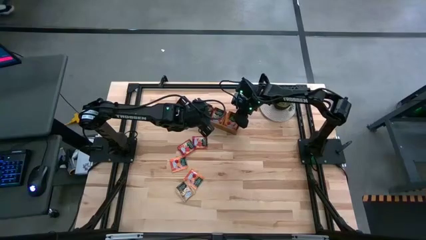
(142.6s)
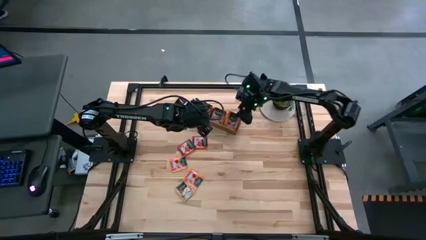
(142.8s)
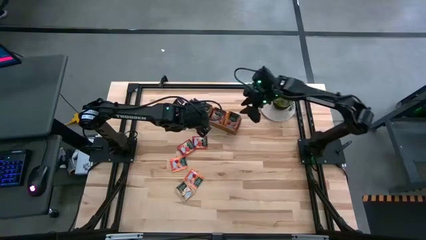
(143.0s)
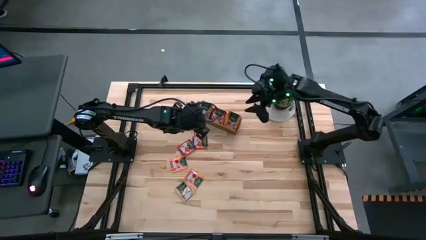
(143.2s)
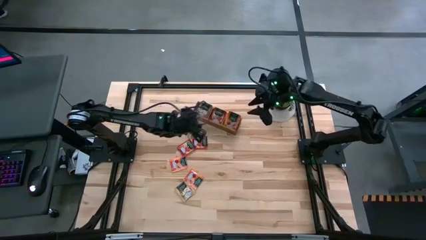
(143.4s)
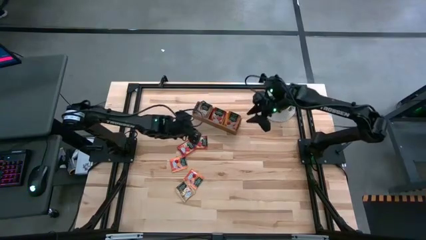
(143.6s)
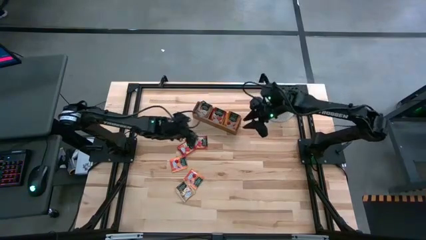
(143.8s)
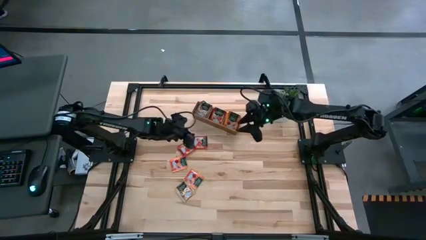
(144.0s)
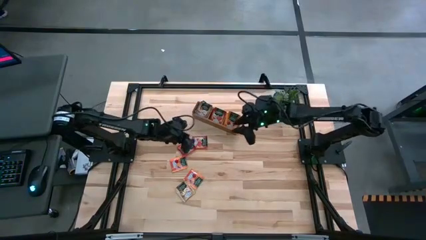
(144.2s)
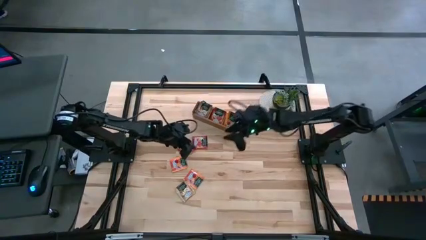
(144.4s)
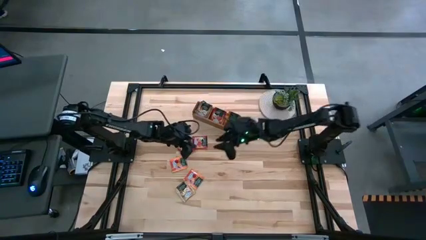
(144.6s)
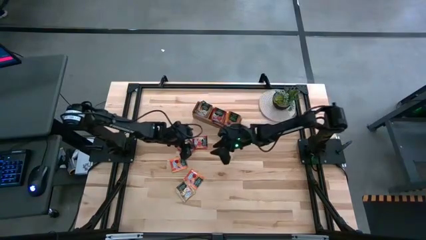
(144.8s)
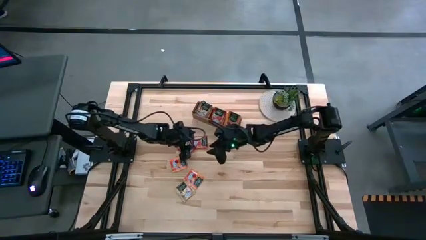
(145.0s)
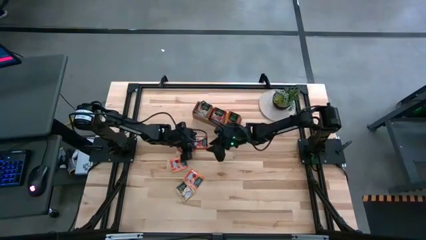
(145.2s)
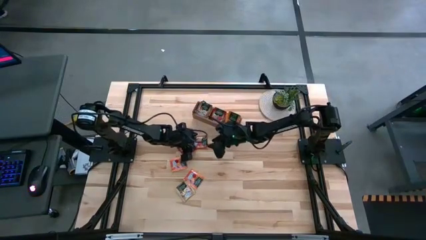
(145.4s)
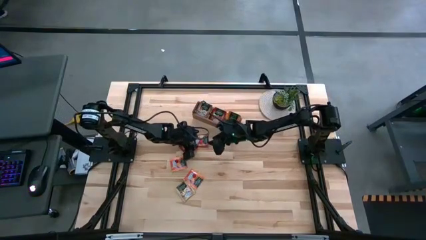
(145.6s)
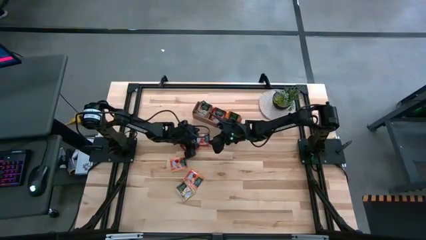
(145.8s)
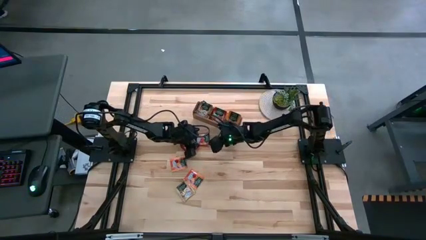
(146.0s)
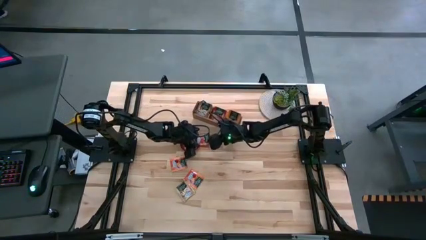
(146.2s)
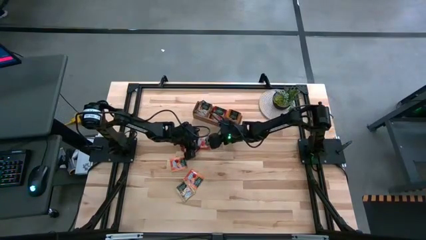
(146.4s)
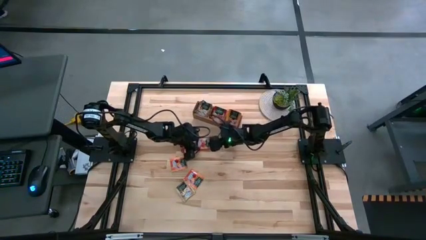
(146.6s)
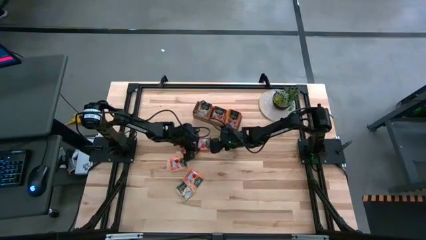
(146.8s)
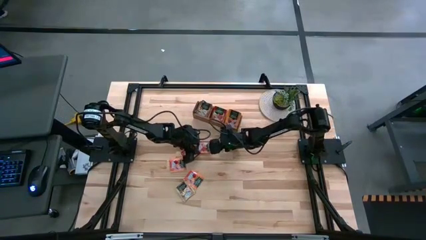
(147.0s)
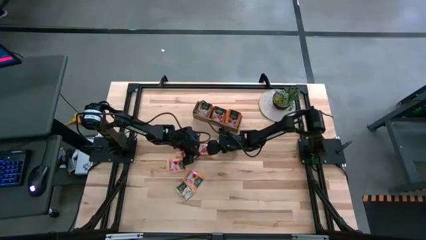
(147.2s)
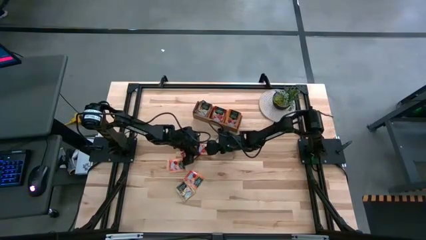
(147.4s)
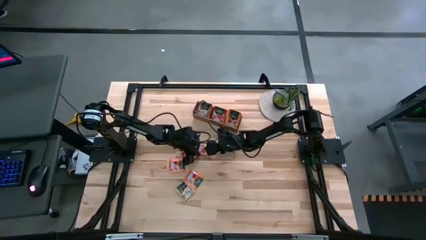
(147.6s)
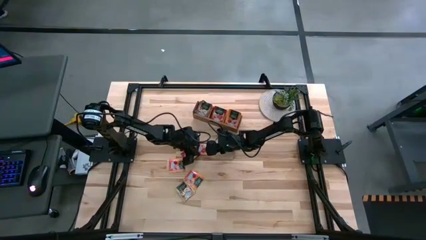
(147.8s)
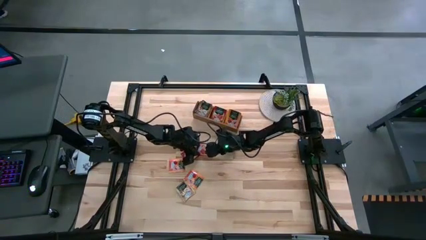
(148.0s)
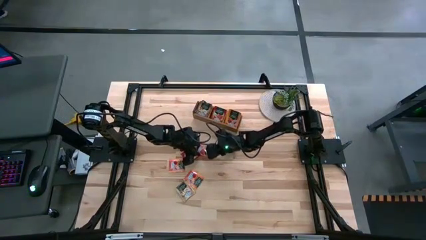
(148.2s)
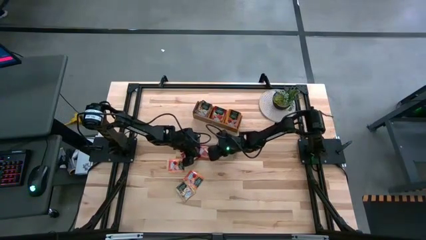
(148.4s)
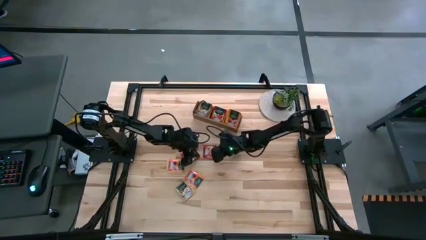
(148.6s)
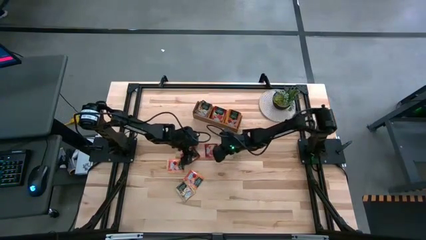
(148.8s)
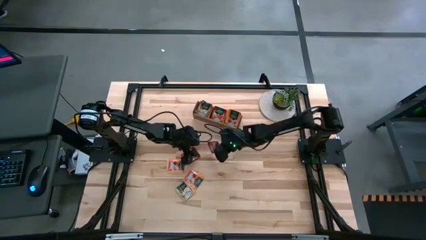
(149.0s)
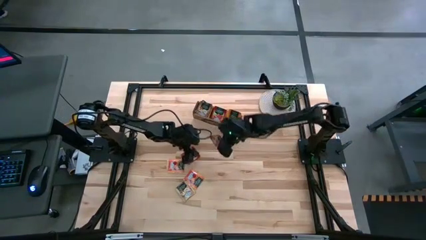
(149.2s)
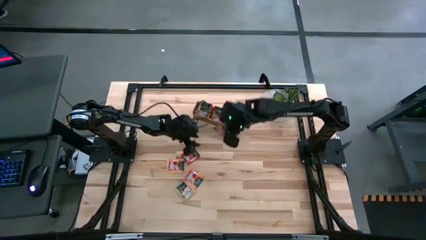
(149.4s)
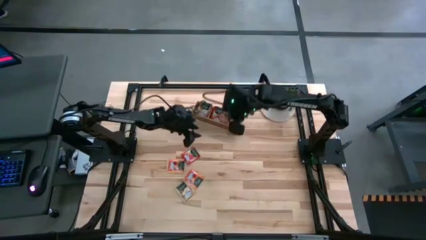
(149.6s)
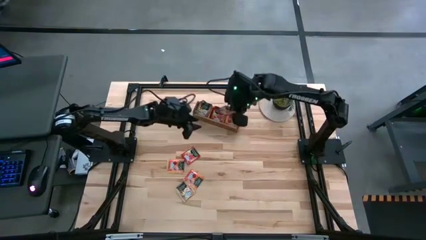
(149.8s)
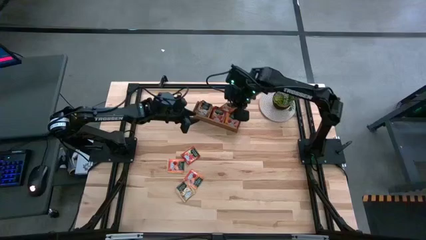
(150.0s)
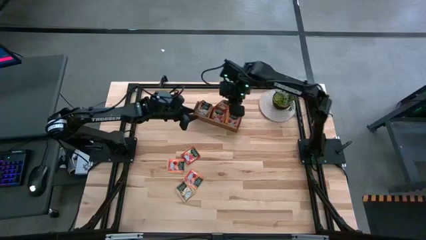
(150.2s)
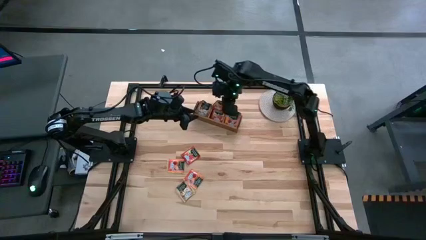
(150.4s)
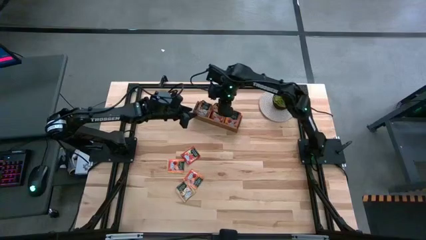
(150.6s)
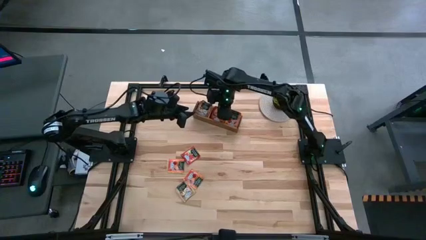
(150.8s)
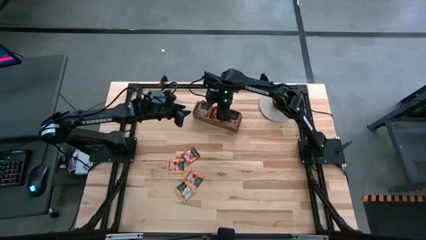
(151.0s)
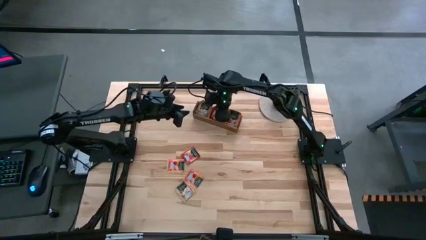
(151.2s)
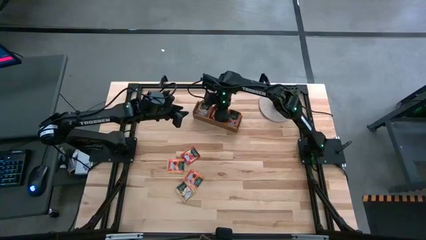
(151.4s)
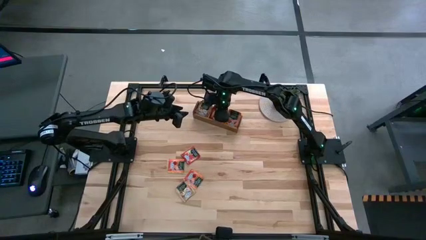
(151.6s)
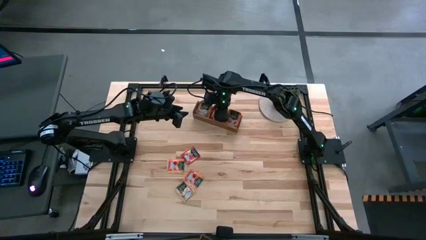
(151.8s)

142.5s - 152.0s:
Task: Pick & Place Tea
Put the red tea bag into the middle section of the wooden organizer

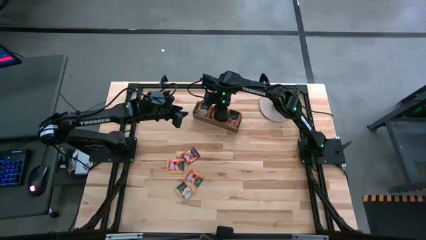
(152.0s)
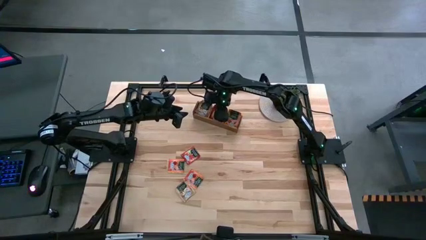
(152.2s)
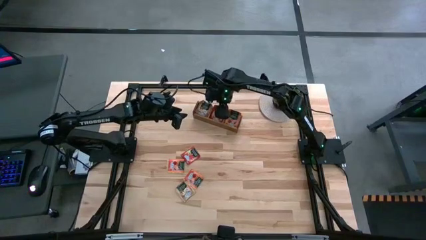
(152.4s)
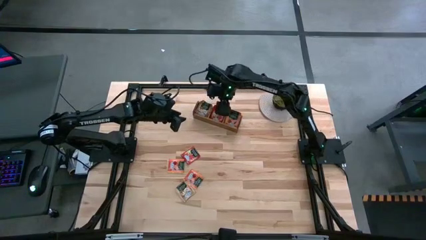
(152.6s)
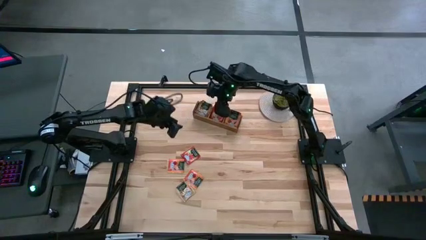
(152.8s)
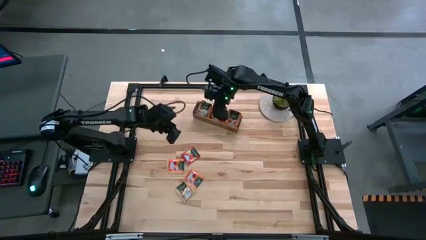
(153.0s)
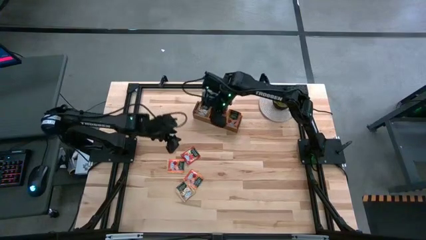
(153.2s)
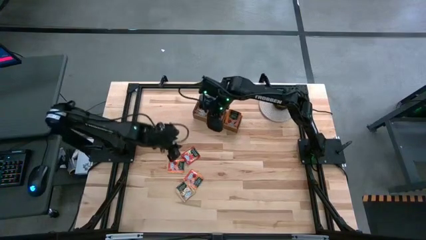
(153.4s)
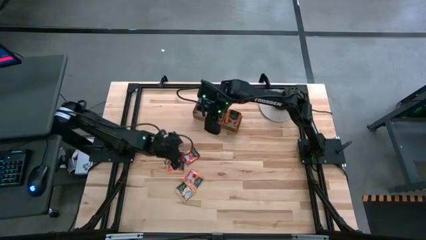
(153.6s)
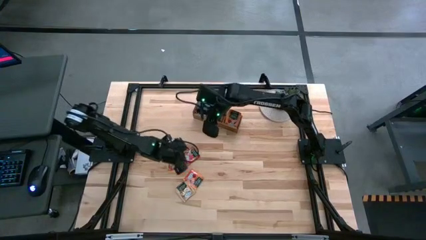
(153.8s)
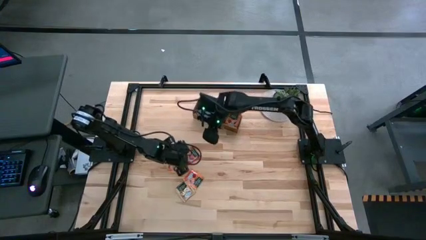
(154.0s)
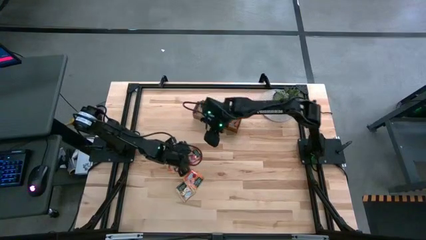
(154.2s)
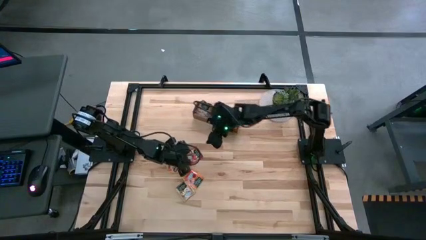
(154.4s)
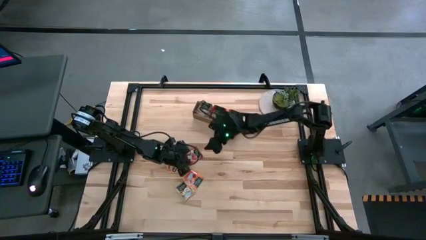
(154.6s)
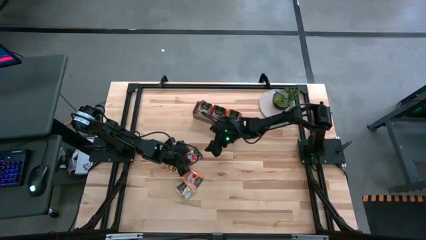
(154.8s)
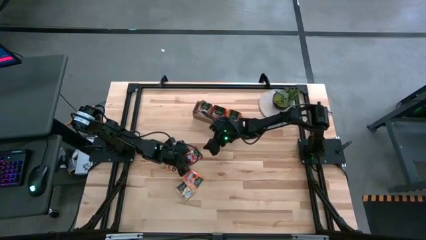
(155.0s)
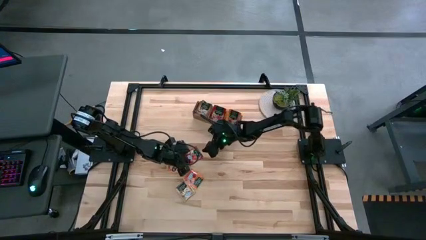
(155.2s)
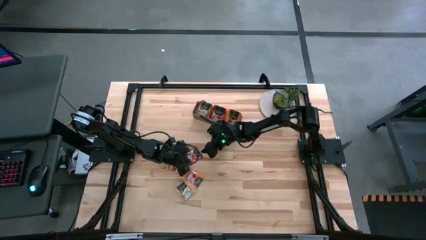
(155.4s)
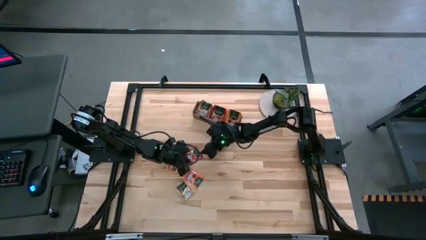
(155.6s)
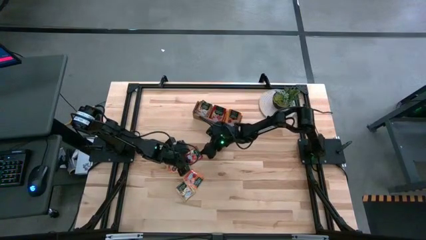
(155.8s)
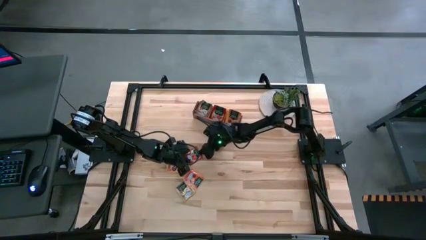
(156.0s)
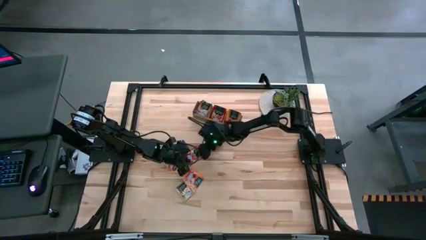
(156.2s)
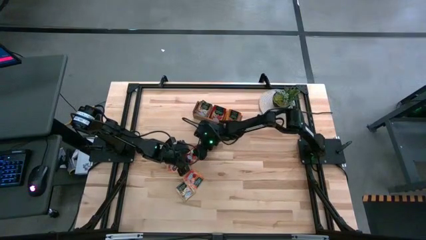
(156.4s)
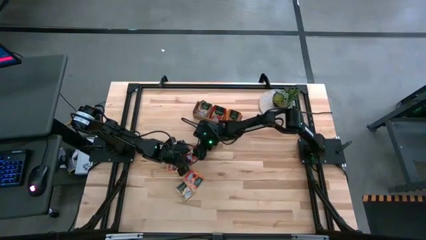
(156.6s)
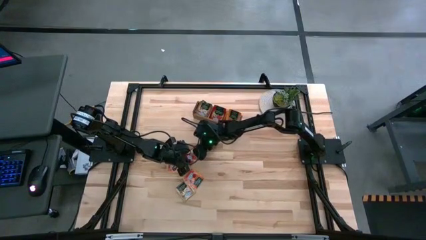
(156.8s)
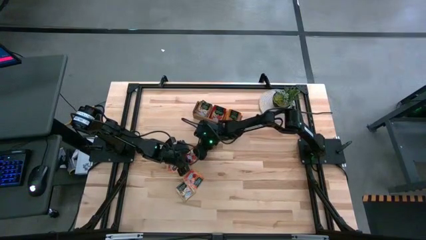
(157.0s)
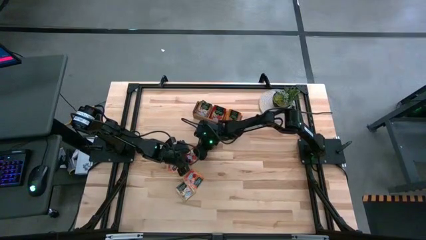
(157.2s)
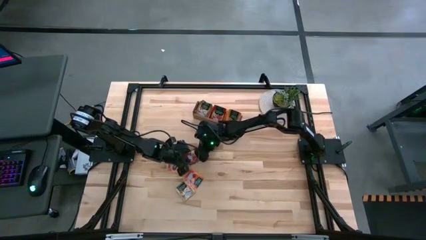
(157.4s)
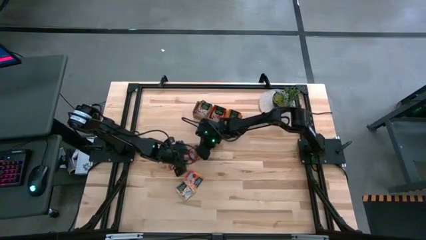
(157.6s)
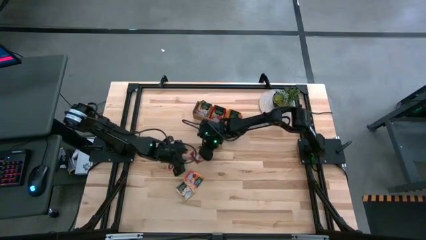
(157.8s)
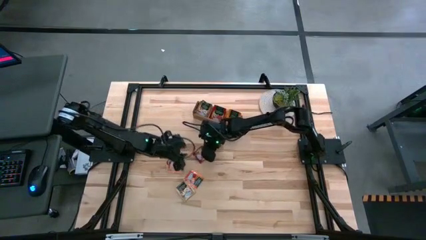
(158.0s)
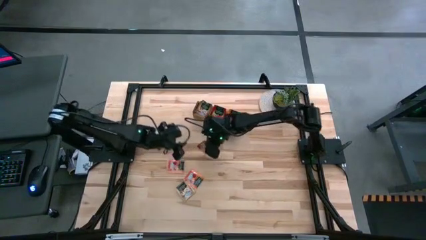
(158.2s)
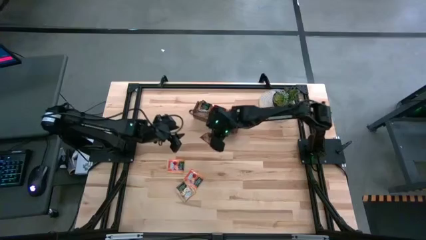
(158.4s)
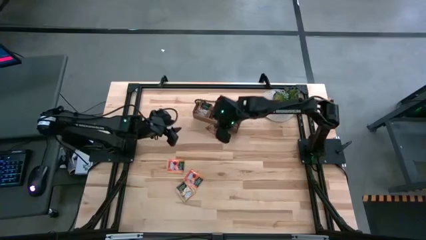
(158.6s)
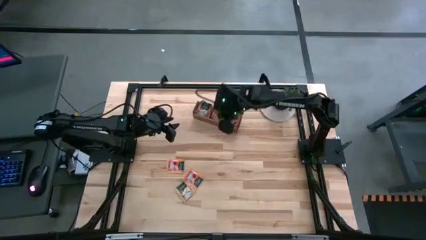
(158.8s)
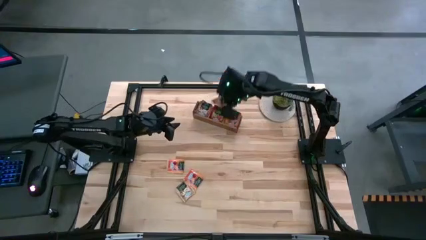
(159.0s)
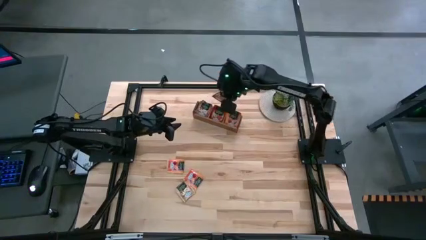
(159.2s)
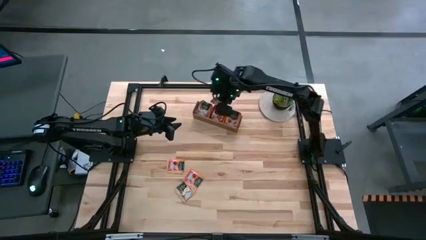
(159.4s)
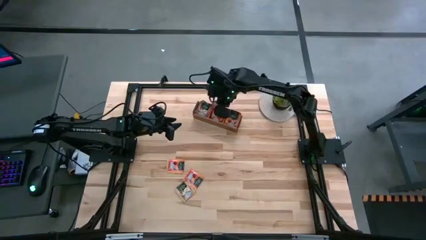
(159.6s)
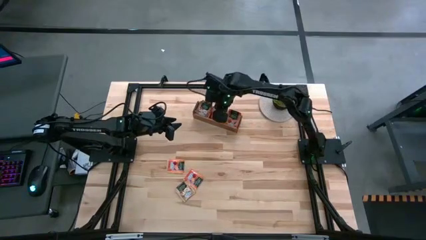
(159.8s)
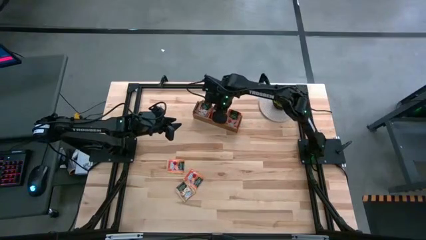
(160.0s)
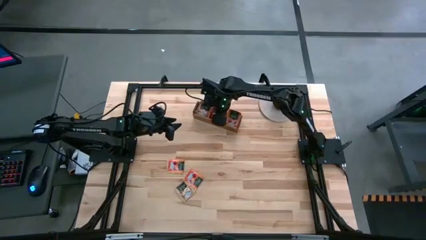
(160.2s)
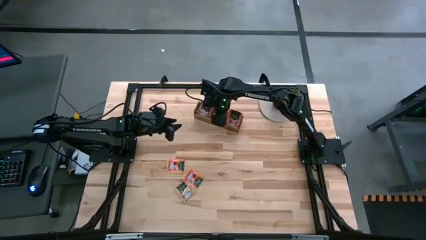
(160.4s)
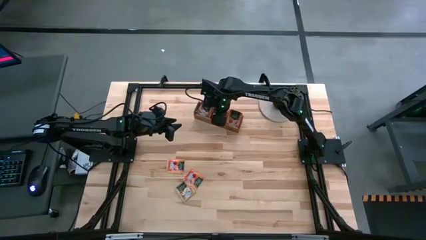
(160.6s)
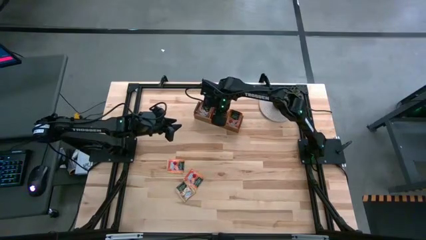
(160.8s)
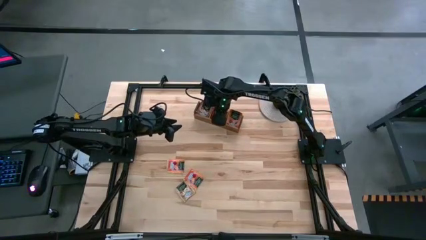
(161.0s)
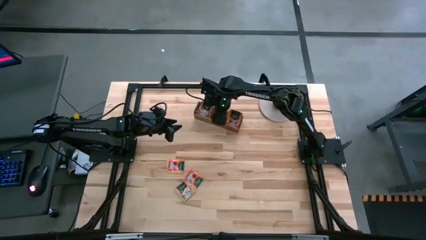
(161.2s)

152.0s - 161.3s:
Put the red tea bag into the middle section of the wooden organizer
